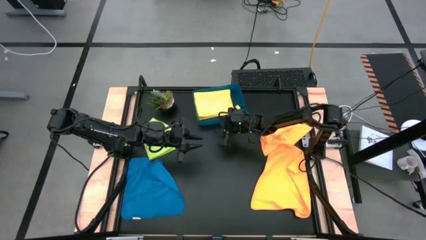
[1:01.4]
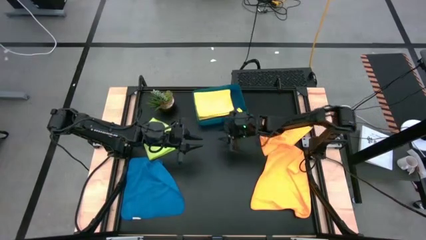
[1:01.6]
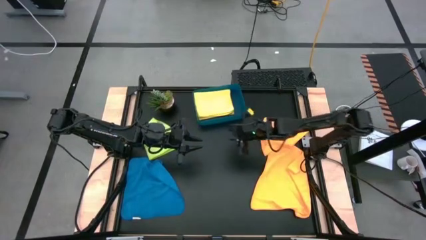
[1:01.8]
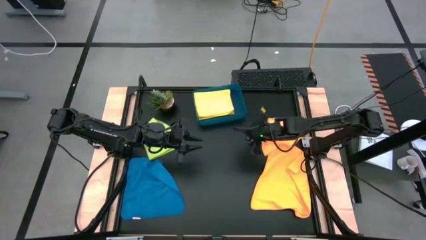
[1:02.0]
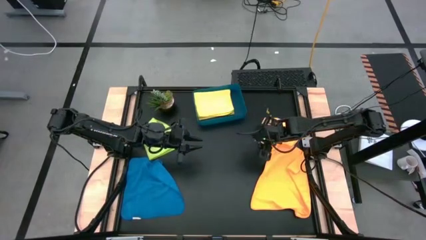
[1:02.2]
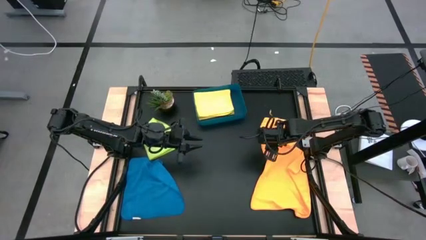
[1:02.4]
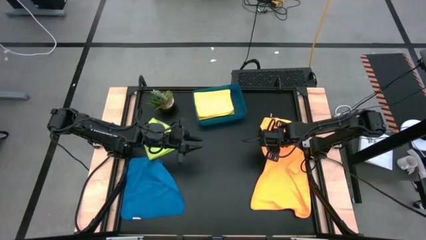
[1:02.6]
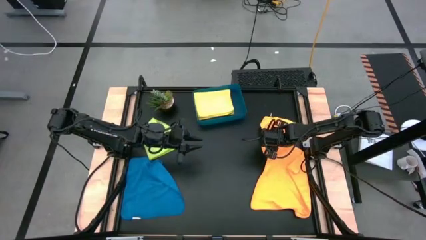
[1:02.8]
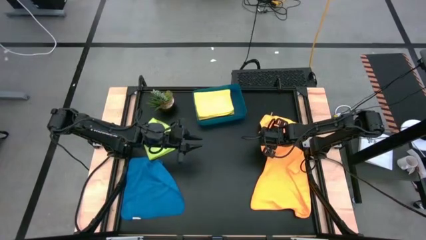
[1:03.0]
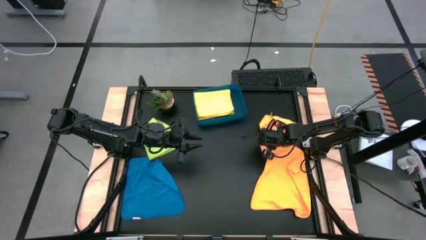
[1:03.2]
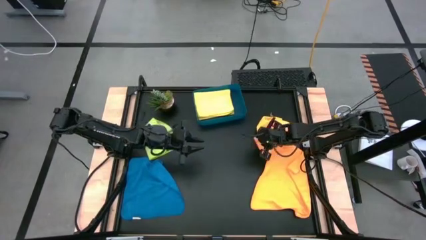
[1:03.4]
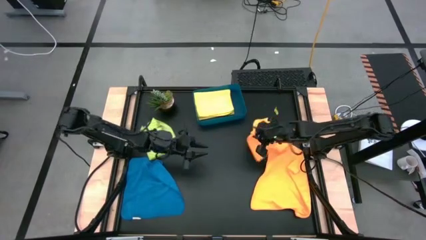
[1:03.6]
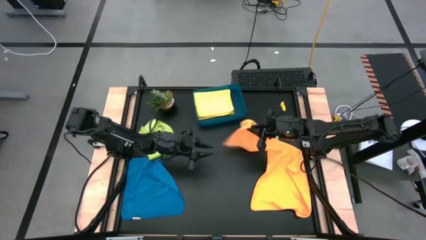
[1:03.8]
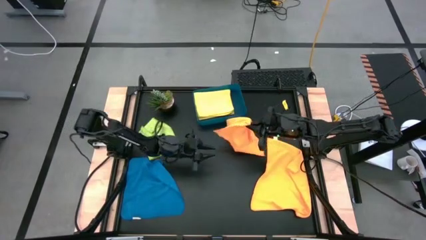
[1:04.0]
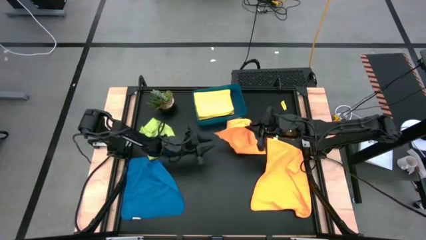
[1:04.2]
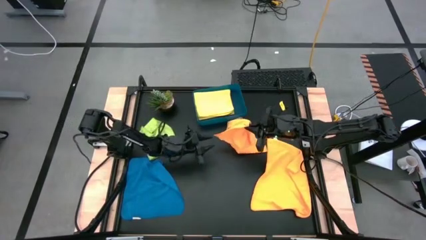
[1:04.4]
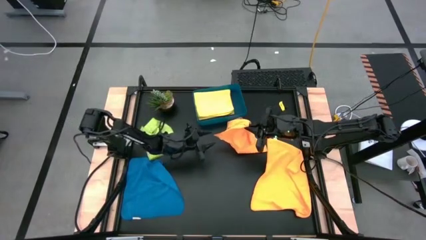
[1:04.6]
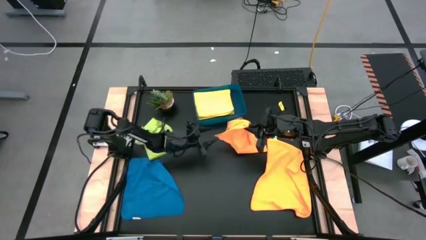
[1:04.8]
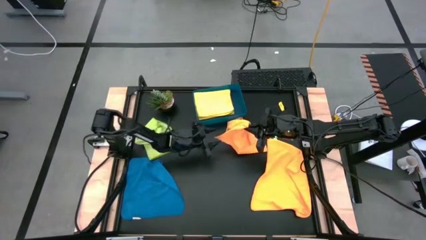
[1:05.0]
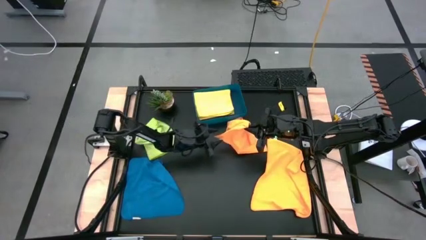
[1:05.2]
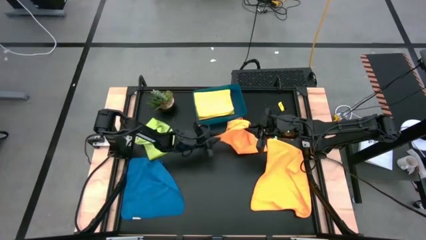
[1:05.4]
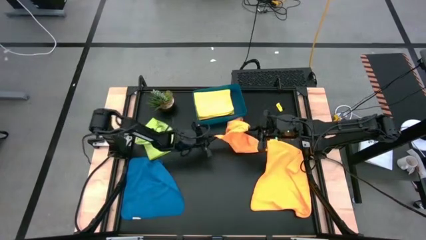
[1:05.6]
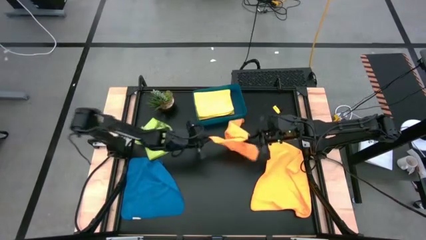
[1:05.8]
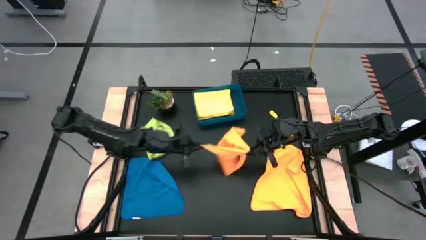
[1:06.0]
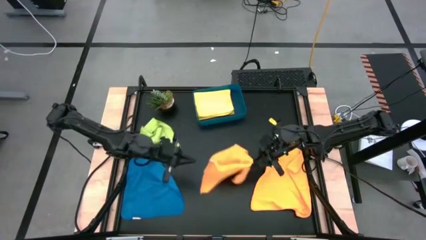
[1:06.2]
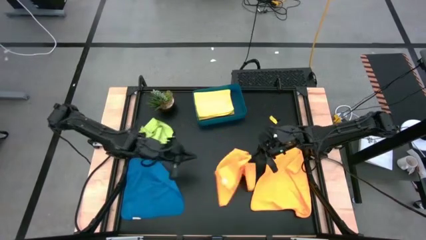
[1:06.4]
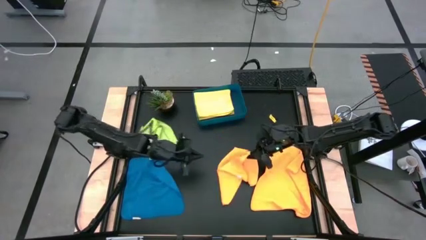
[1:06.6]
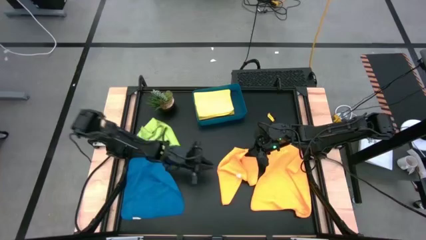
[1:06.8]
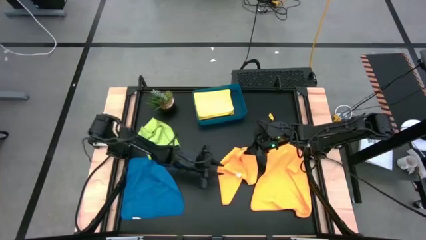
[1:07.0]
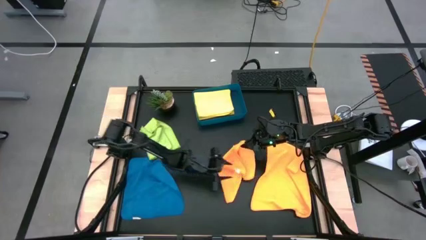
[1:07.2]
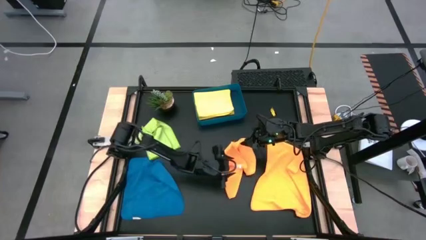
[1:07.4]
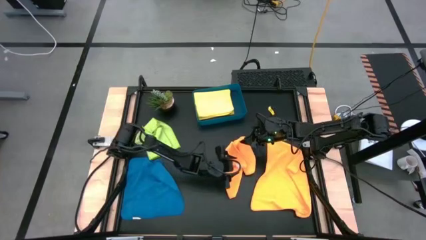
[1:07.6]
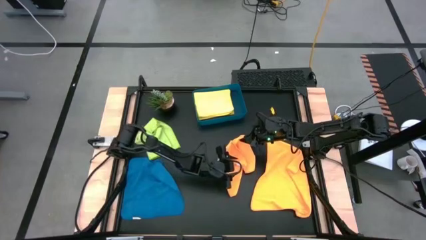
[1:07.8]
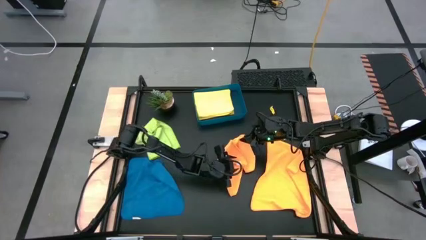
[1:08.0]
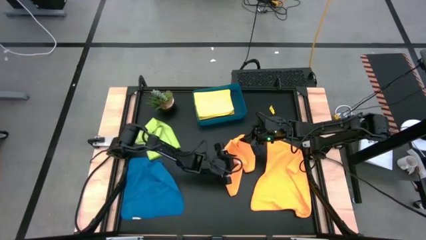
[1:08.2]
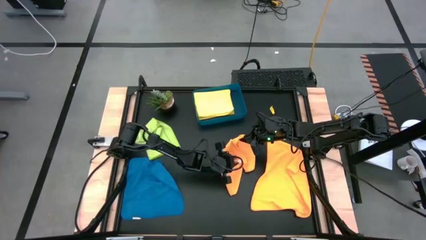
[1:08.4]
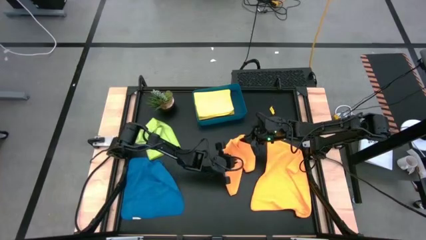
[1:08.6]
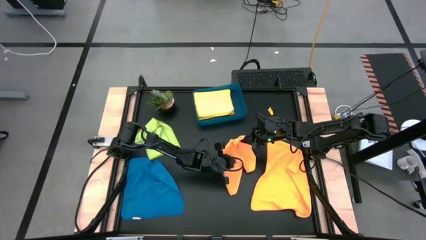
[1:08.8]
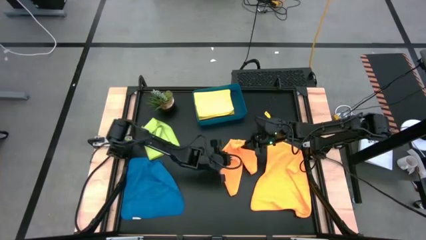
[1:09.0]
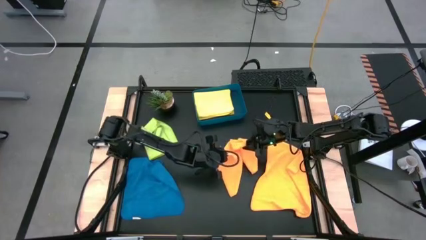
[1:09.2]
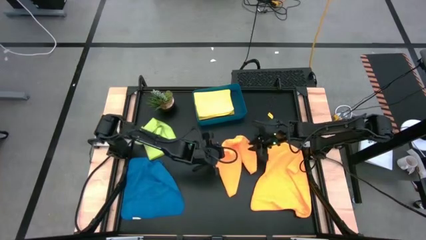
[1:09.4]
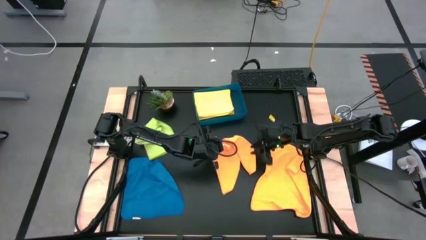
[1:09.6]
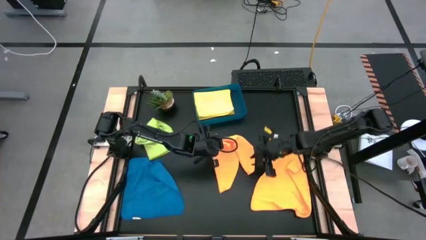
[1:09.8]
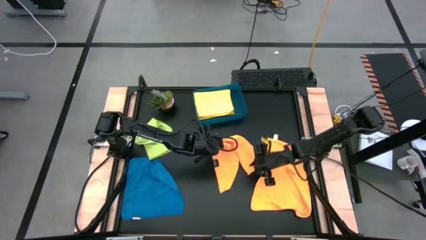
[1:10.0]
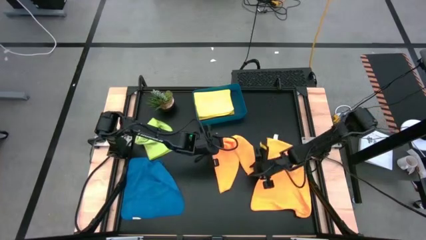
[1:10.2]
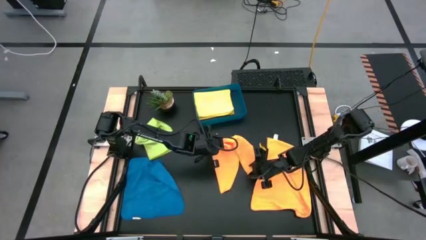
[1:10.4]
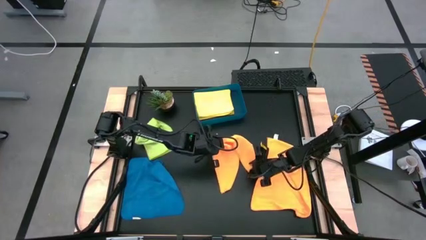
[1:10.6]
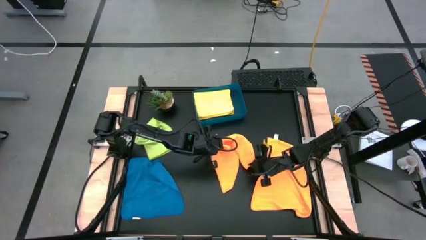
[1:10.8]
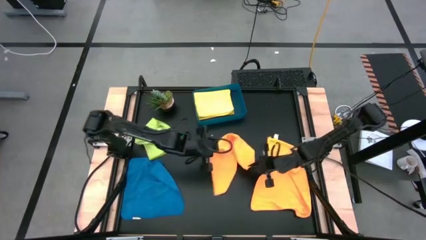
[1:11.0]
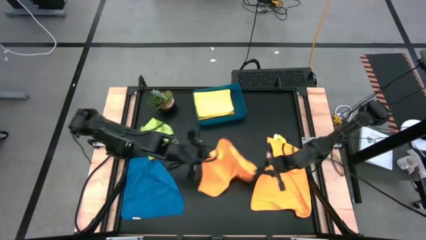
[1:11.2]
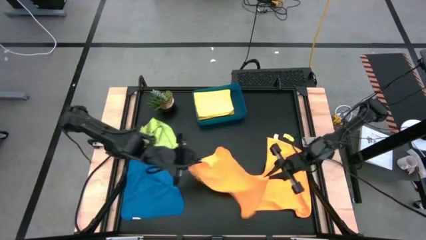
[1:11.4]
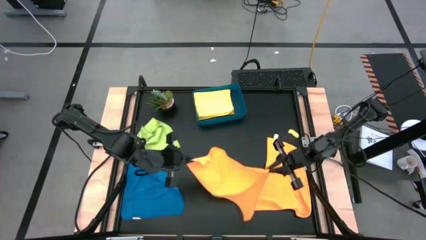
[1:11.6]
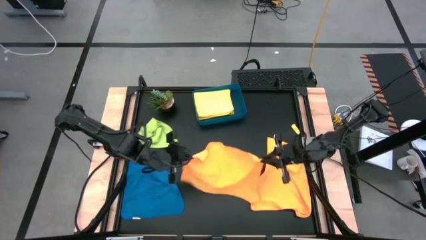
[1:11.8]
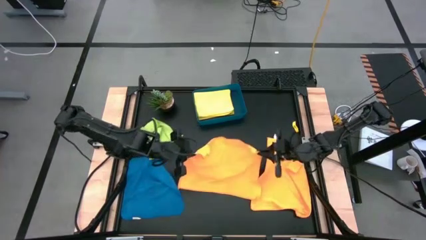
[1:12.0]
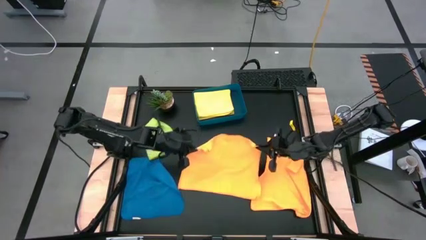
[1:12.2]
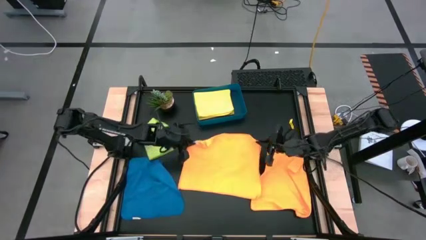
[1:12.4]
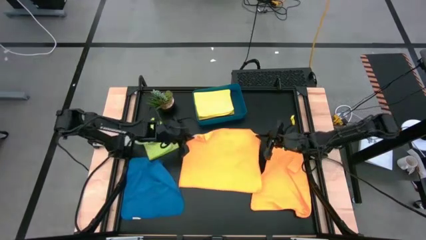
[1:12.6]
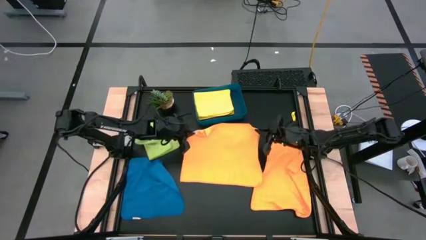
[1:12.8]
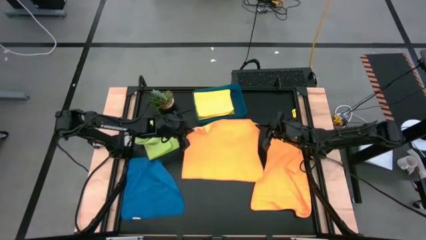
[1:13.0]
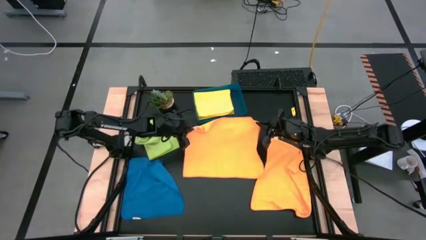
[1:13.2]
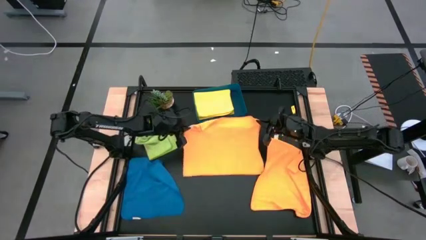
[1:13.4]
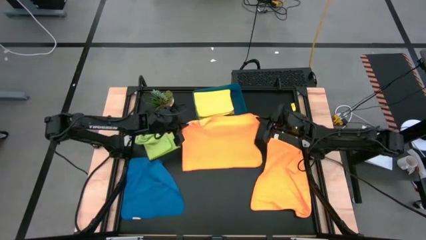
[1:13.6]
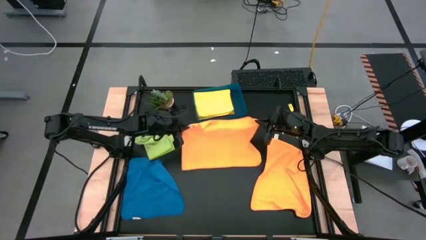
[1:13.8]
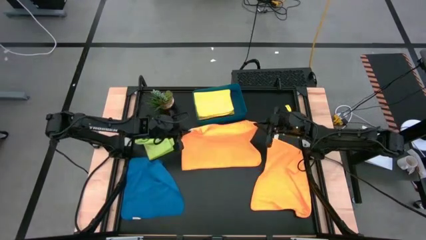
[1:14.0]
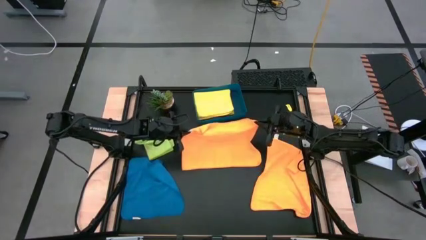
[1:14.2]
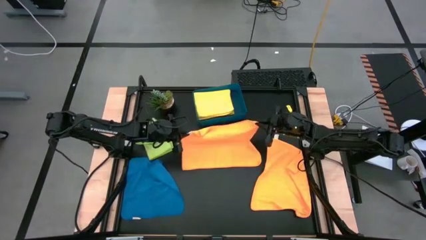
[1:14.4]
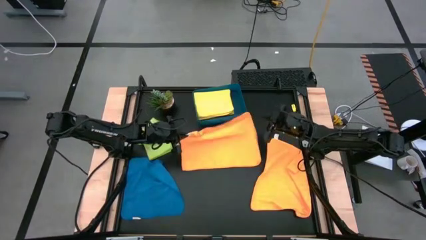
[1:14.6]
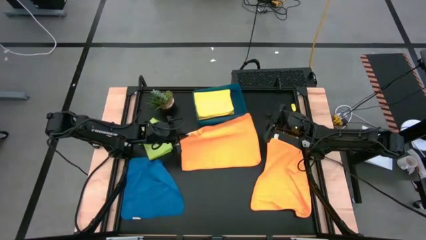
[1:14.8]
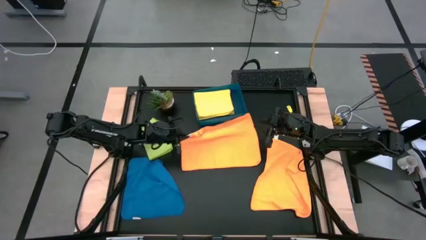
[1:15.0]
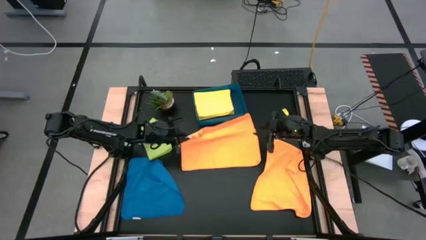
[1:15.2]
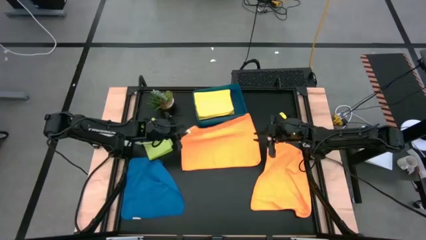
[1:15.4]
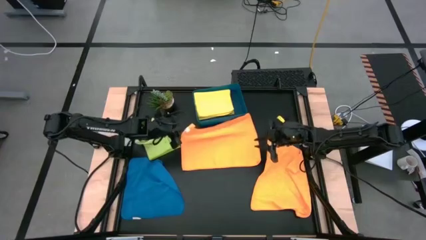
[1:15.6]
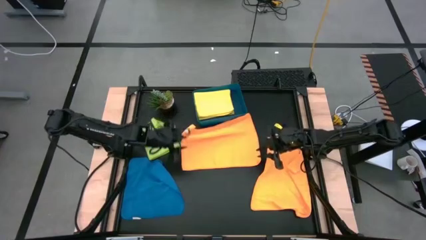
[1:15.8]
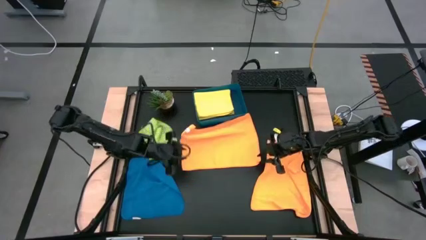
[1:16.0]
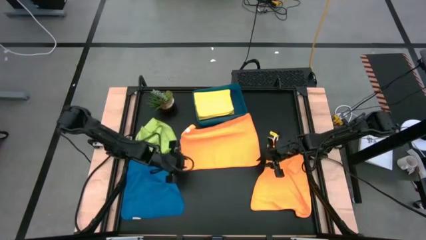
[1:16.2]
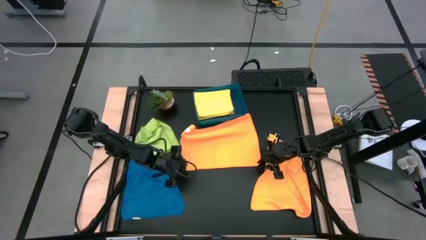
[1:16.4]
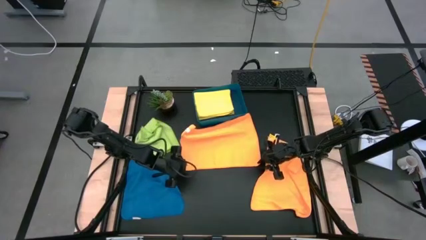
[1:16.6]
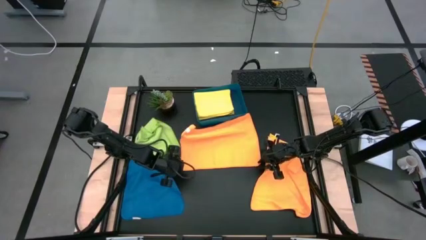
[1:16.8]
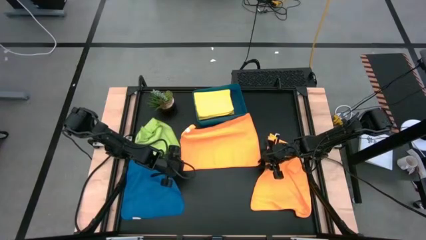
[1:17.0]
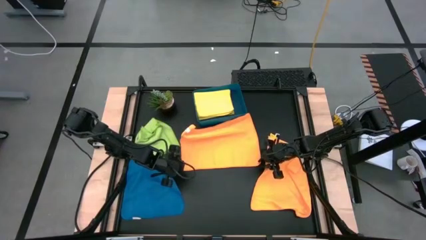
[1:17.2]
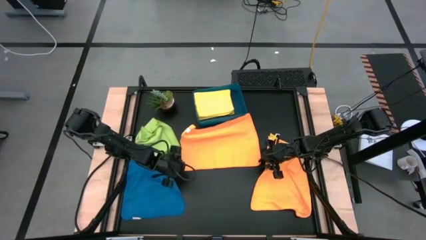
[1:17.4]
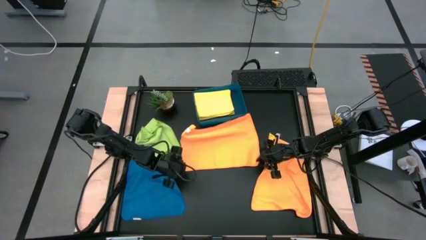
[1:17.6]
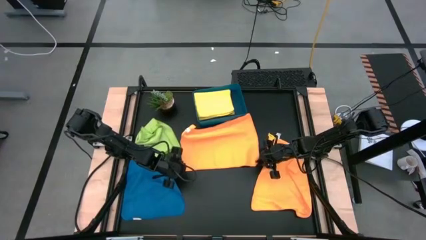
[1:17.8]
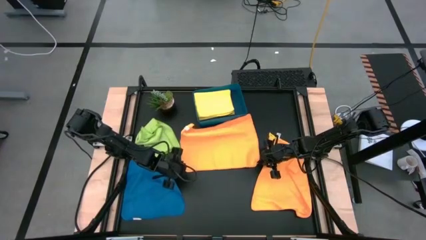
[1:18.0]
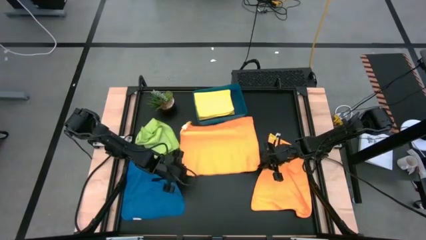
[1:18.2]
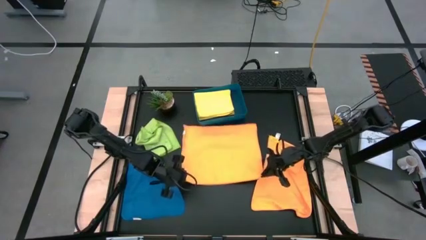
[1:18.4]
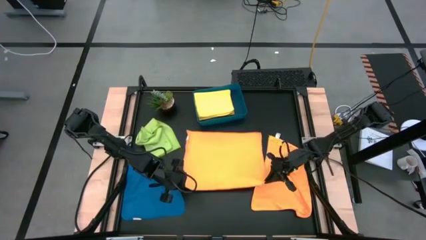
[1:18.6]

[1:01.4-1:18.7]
Task: Fold microfiber towels
Fold the top orange microfiber cloth
